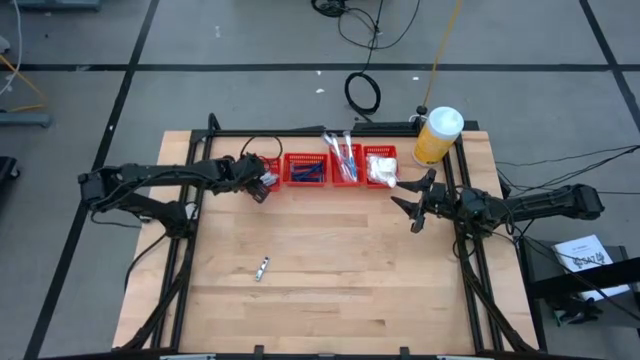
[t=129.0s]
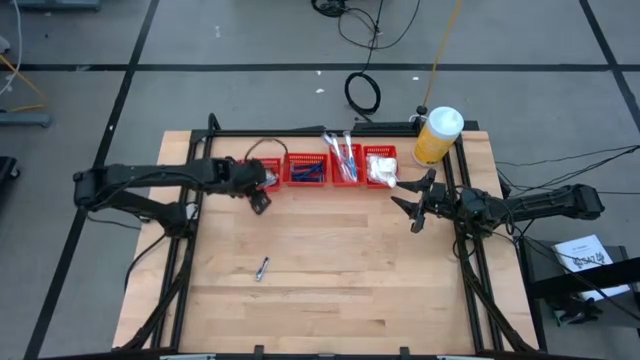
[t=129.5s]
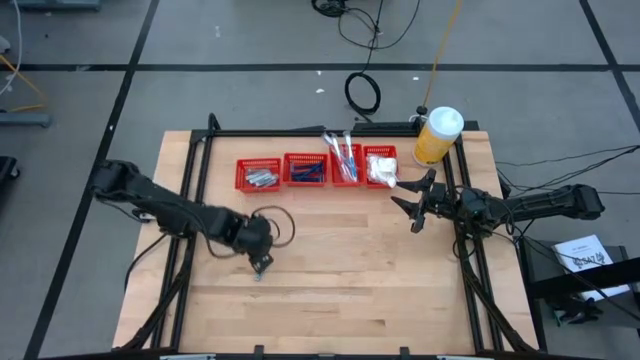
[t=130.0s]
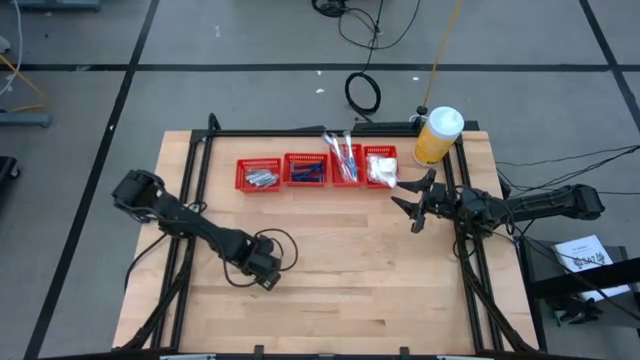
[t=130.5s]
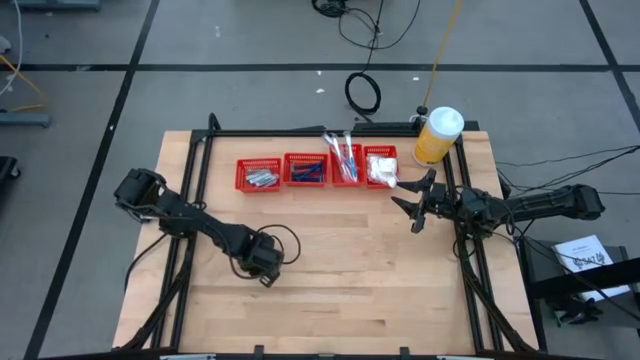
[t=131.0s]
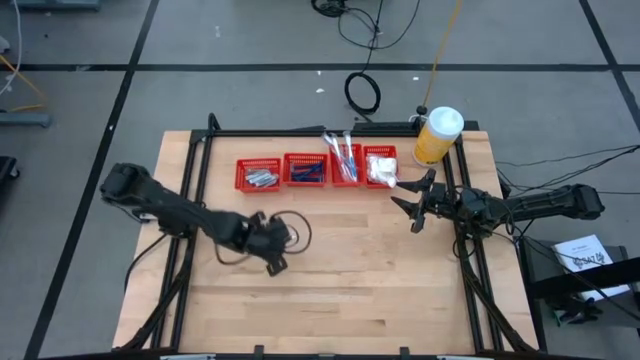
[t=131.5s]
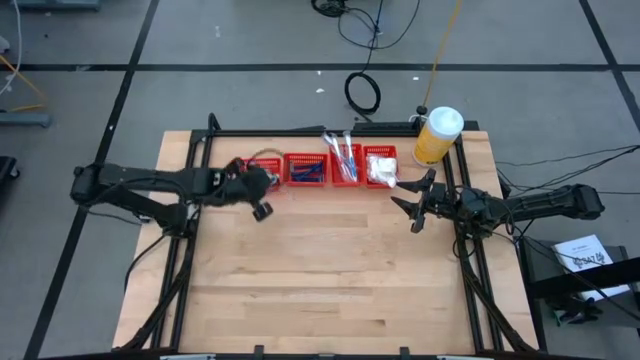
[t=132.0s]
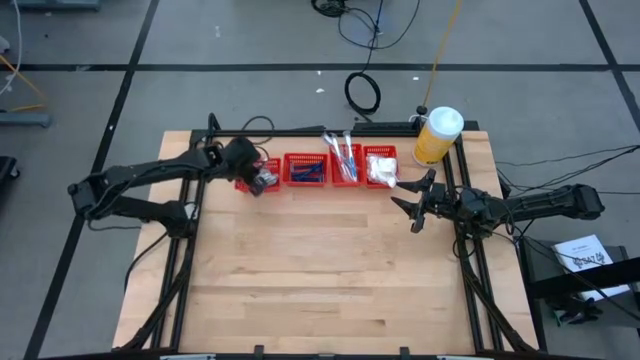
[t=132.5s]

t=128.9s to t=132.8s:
Task: Pick & Place Travel size toiletries
Put the nail cutter into the horizontal left red bin

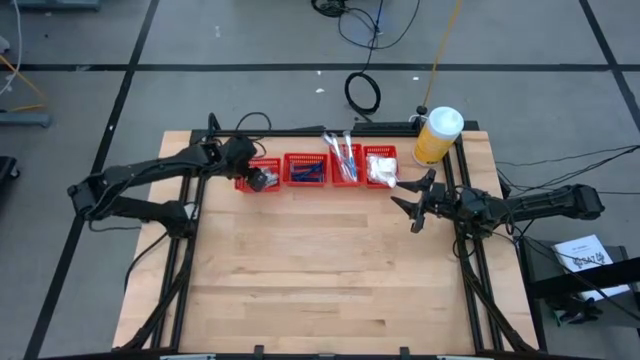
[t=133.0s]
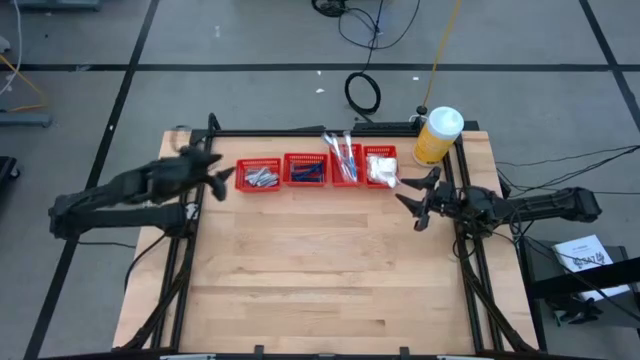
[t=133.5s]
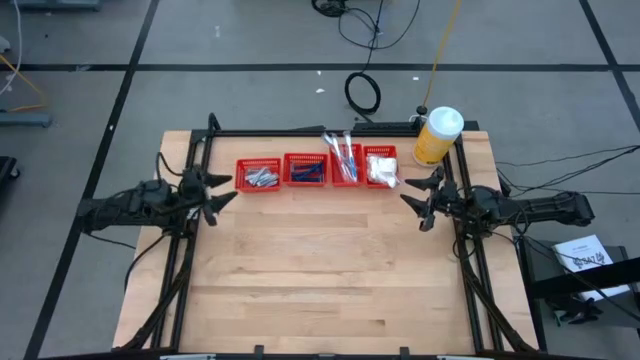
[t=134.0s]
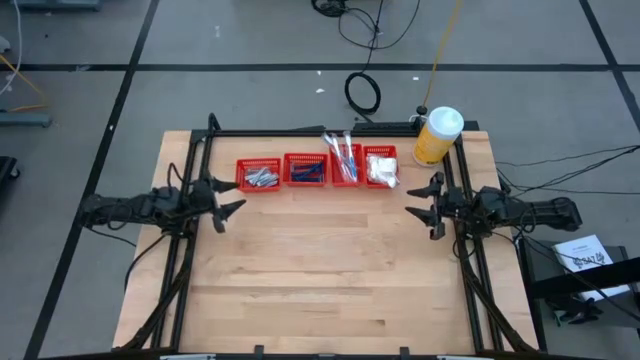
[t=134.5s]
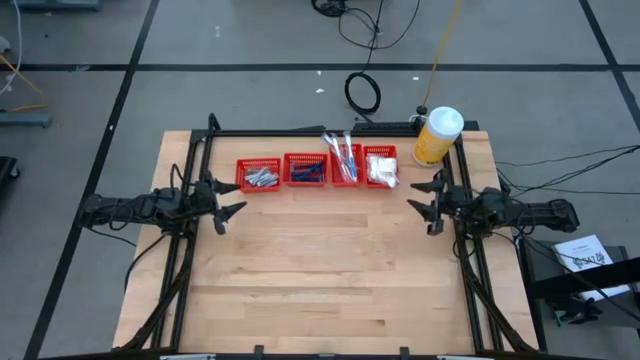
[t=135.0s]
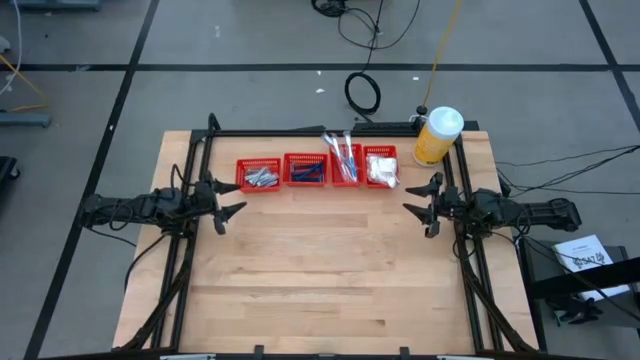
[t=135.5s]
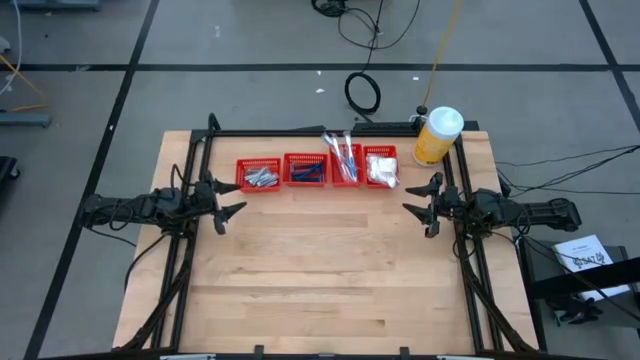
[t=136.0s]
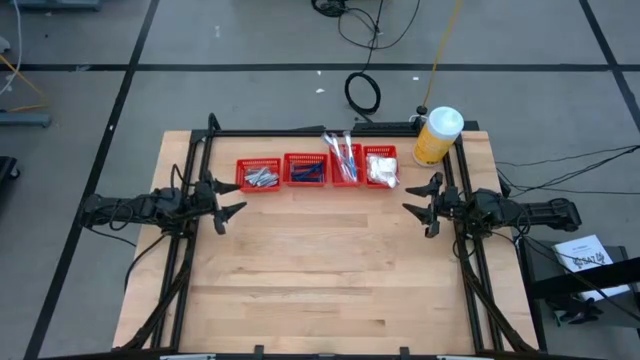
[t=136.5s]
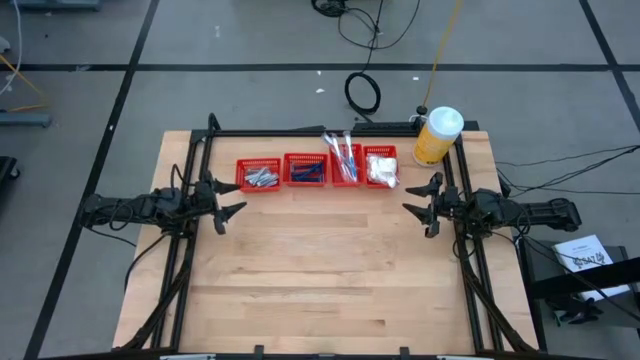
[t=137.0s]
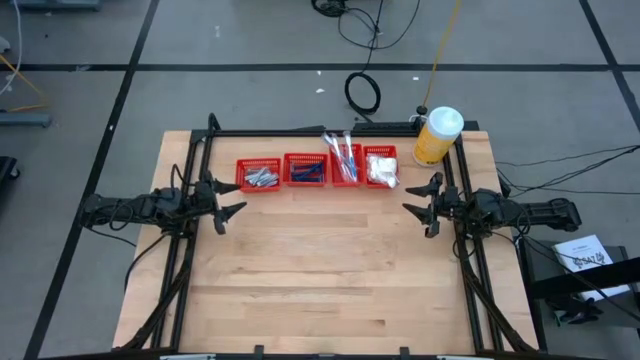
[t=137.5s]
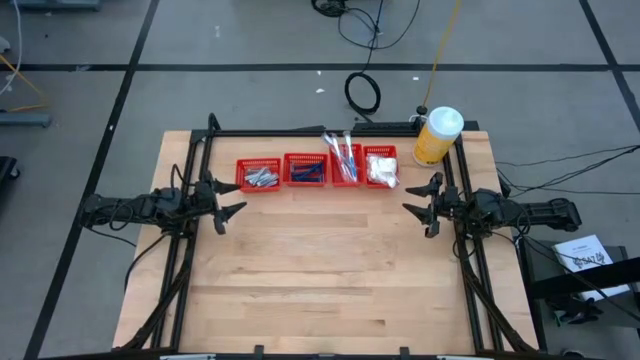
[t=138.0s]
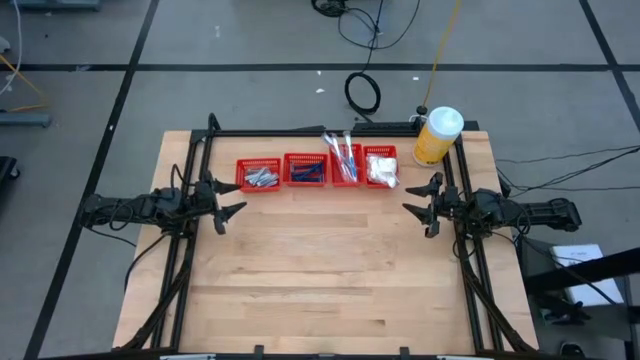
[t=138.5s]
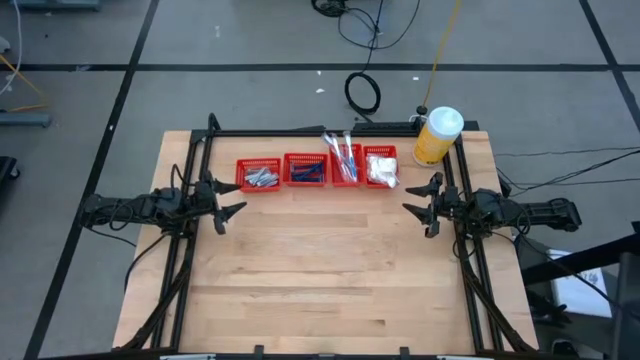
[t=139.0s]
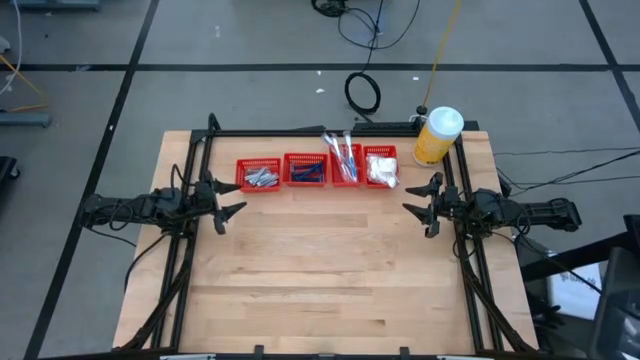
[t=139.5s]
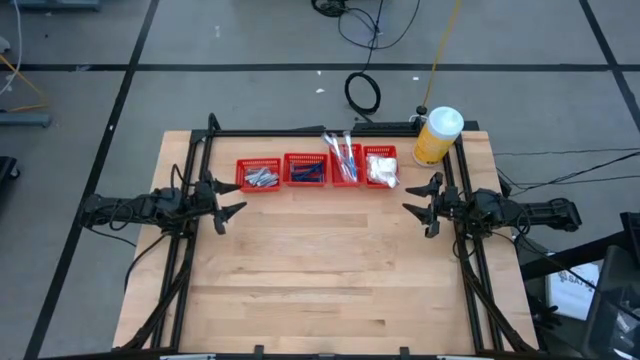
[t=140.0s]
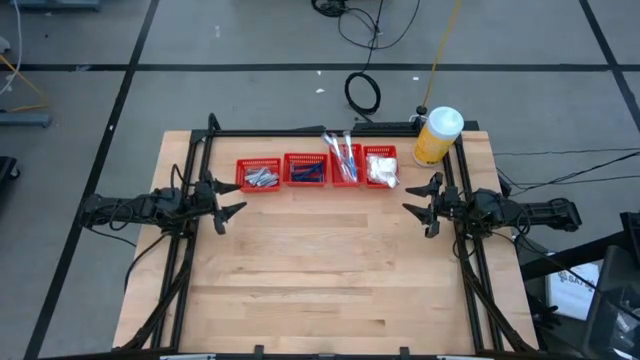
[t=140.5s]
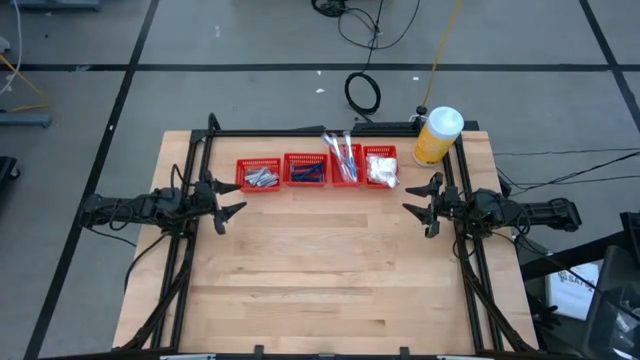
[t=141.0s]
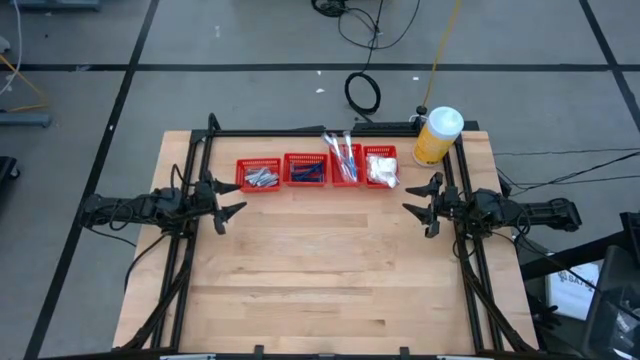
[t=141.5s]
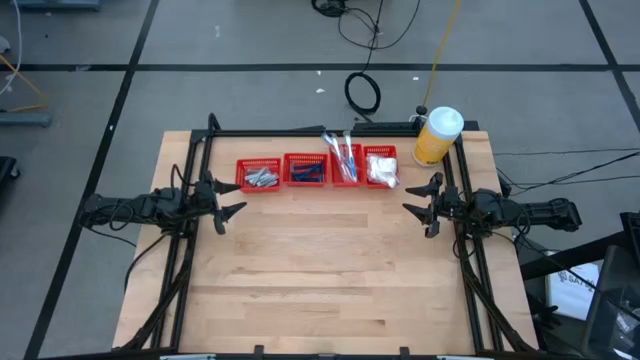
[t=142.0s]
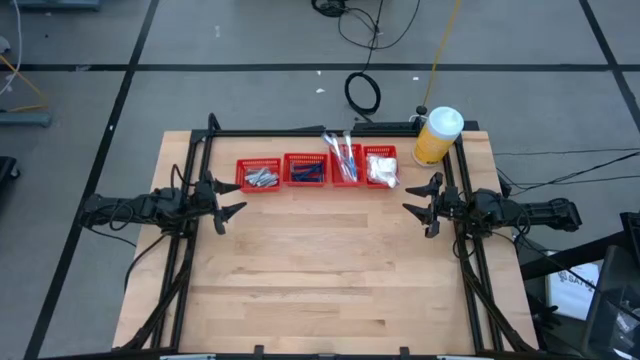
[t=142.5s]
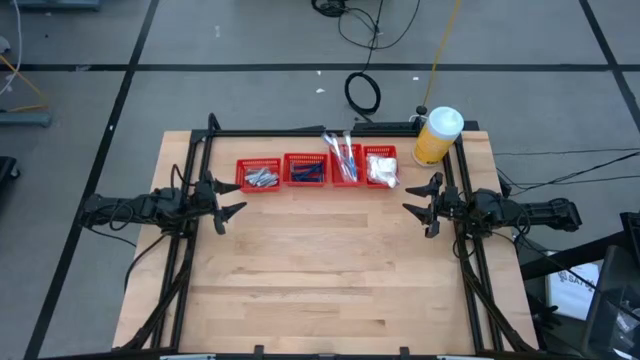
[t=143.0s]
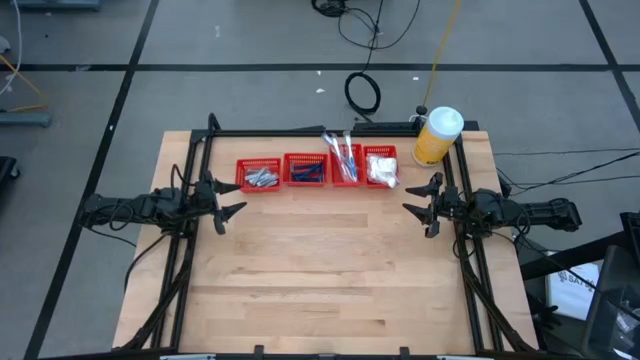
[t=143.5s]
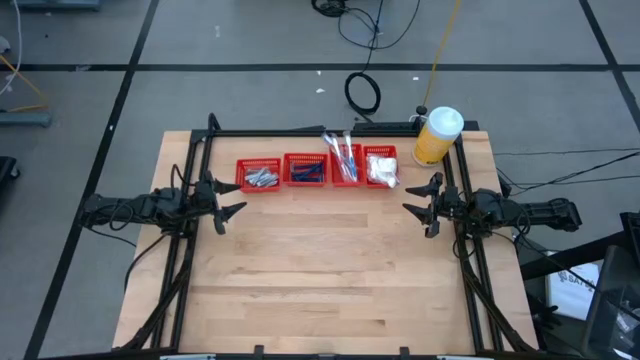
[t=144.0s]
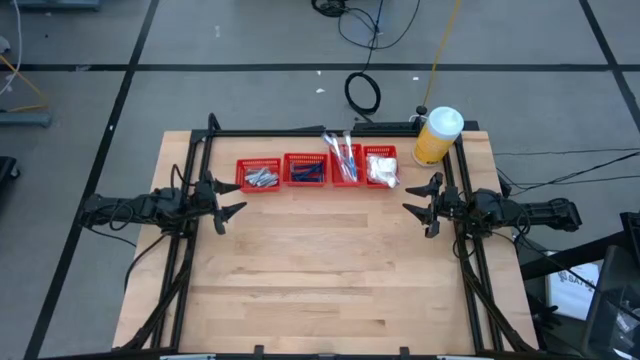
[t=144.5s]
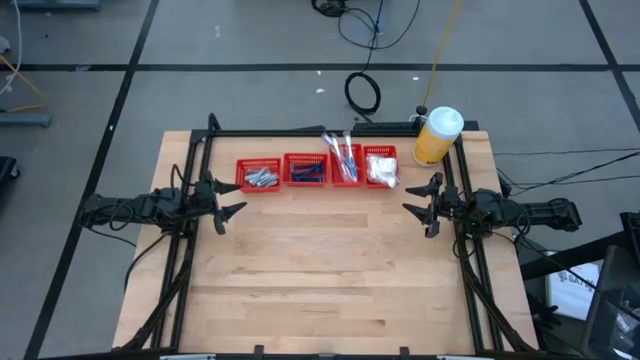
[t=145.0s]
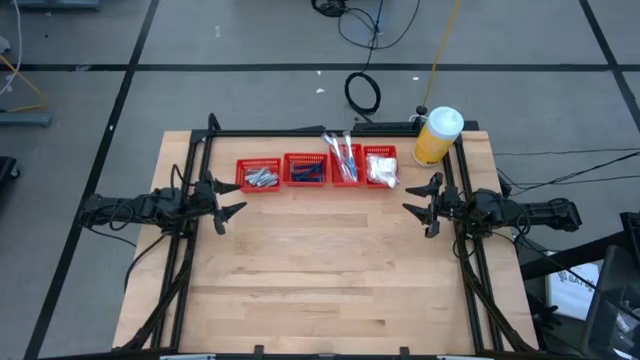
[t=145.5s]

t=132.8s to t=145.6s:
Return to Home Position

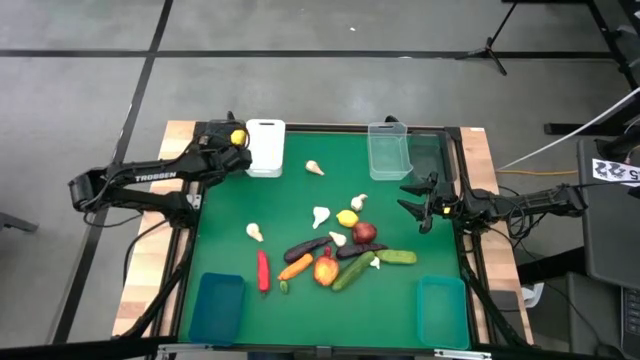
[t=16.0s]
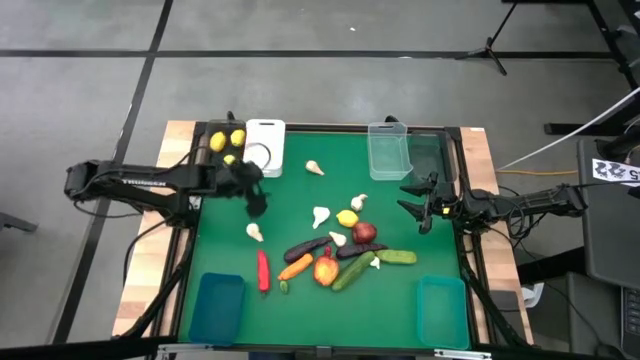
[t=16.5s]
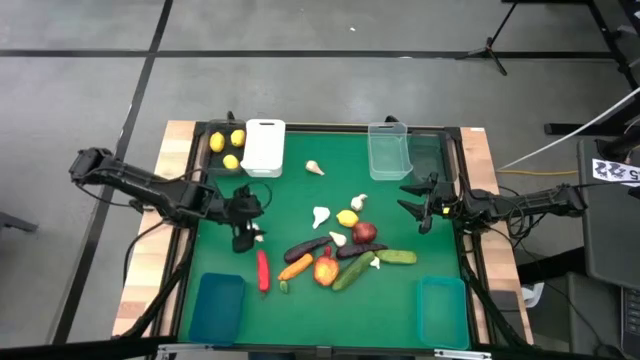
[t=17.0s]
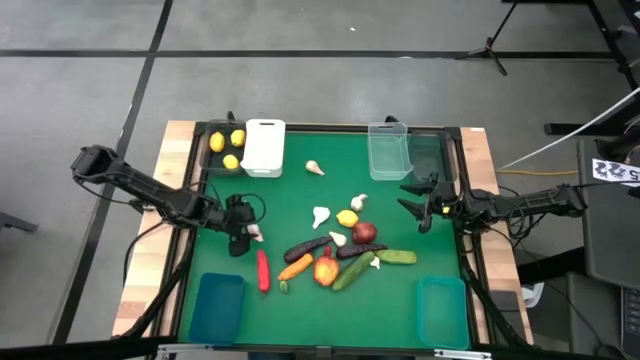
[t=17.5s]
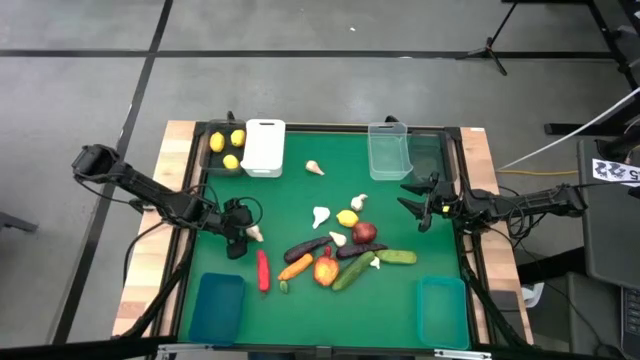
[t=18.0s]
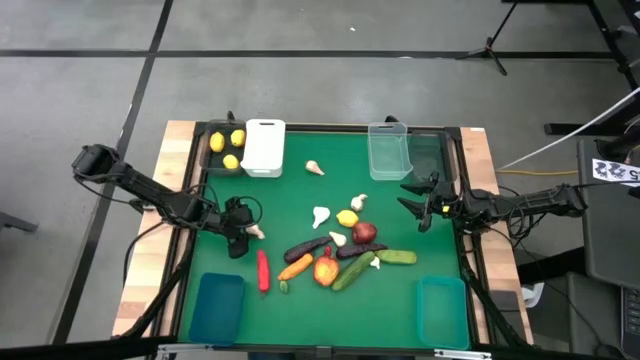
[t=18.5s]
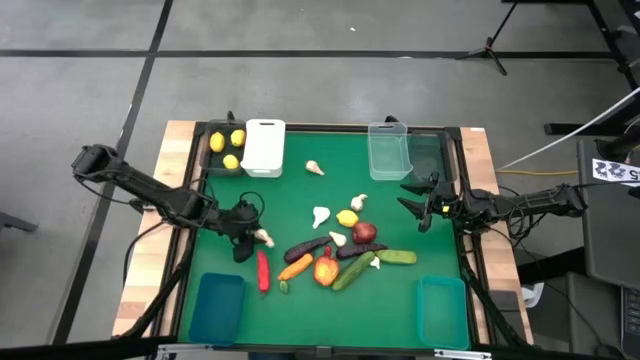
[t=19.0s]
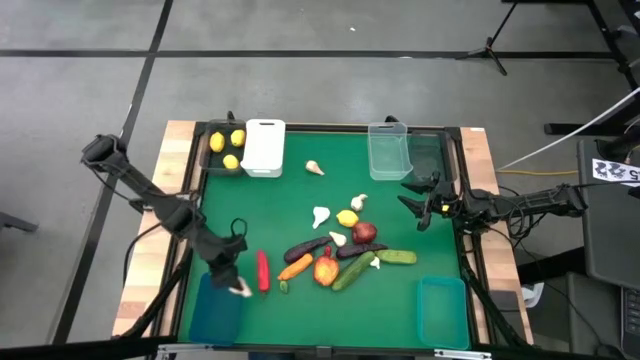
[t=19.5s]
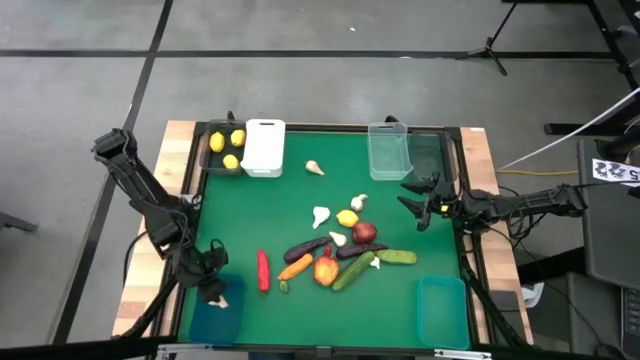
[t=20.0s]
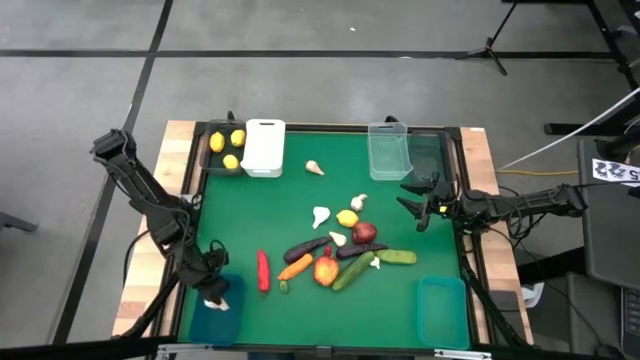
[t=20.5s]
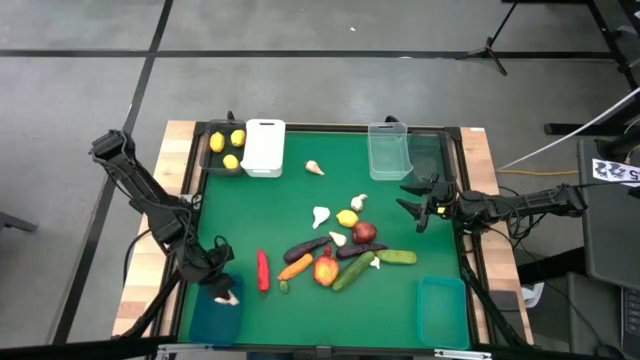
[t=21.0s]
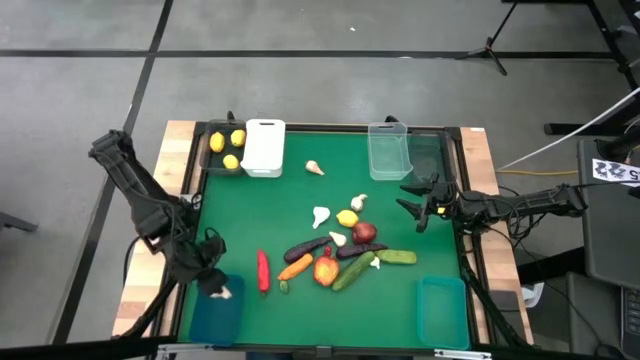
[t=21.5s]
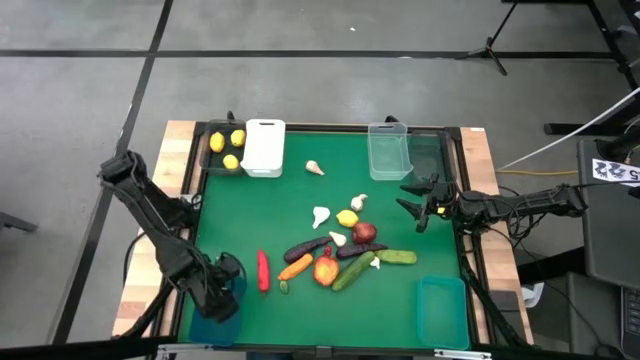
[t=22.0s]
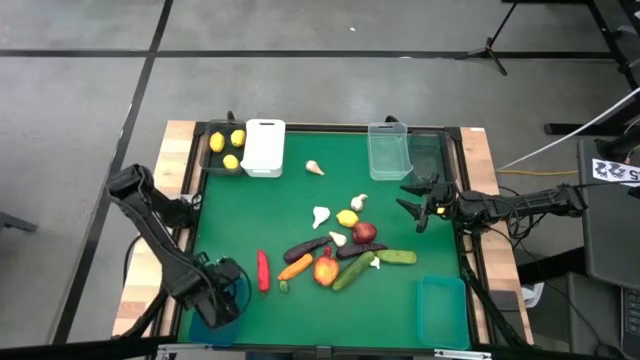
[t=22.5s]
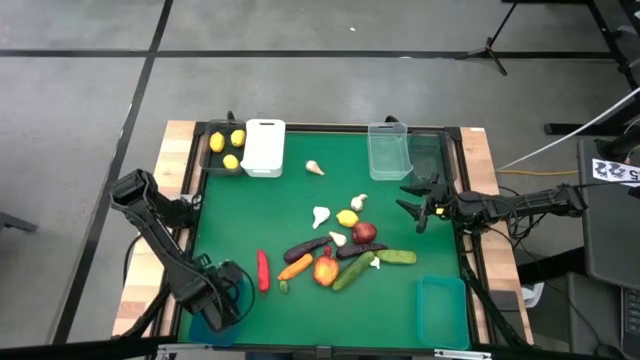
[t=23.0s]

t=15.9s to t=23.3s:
Task: Sort produce into baskets
Put the garlic into the blue bin
